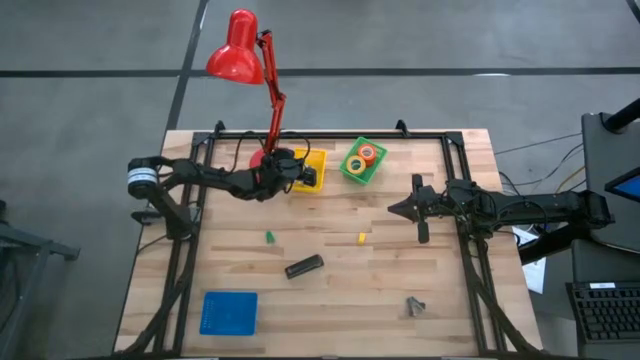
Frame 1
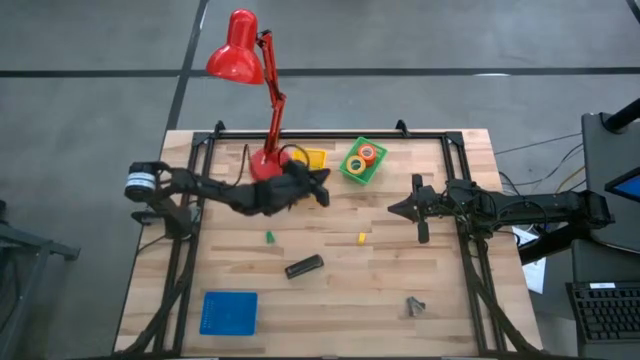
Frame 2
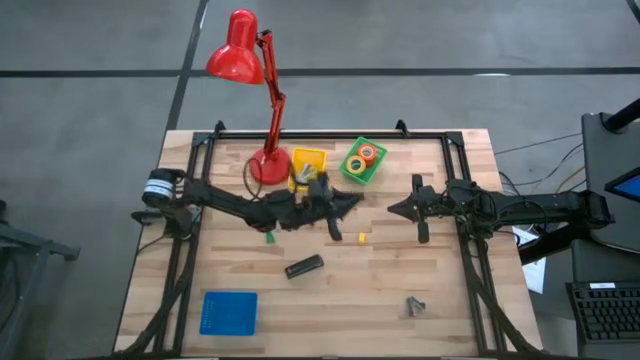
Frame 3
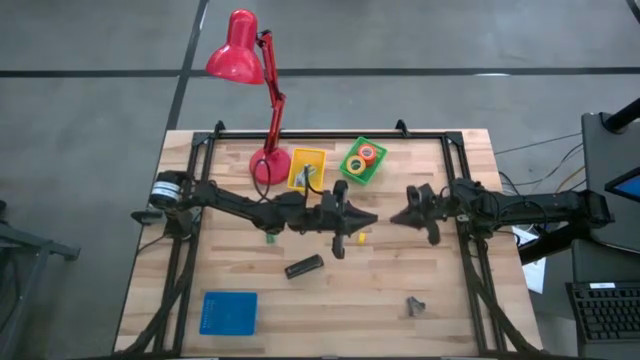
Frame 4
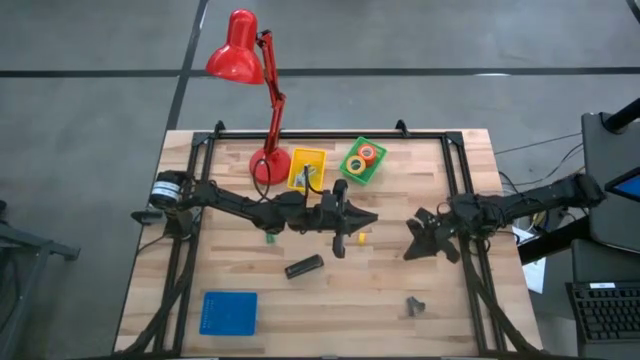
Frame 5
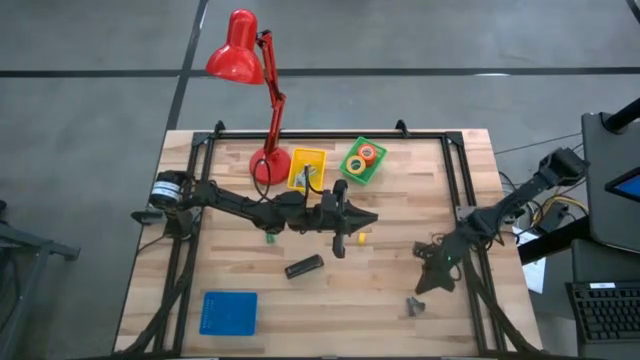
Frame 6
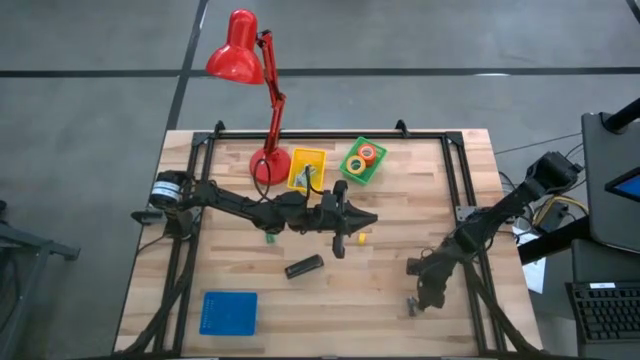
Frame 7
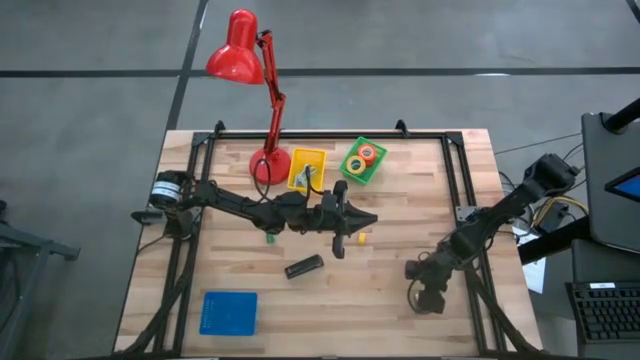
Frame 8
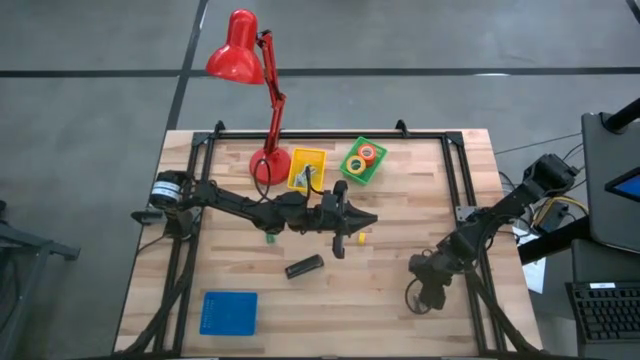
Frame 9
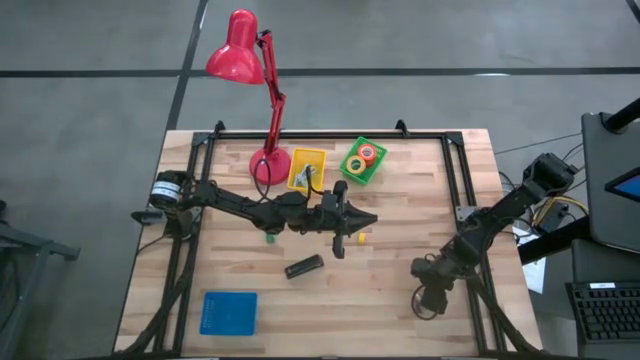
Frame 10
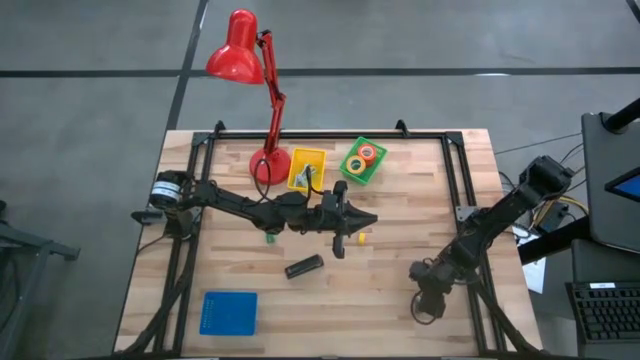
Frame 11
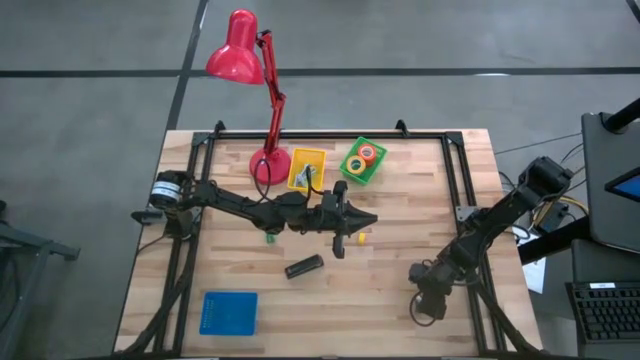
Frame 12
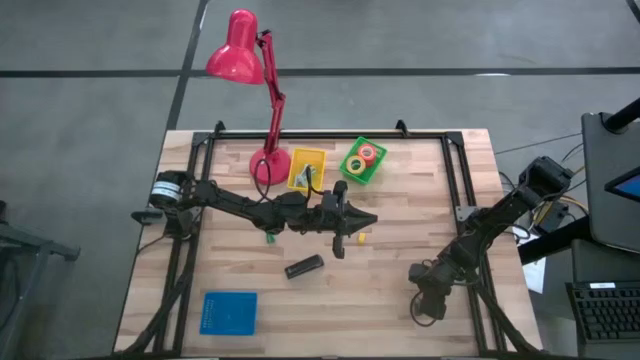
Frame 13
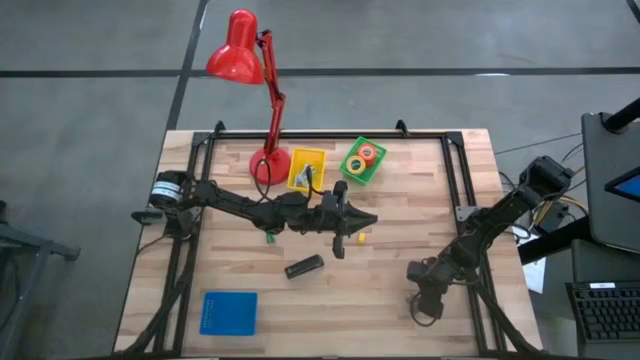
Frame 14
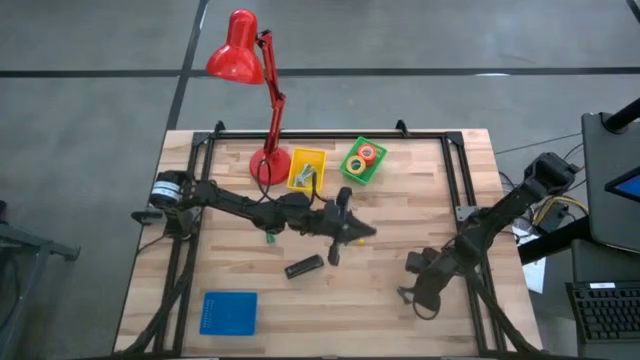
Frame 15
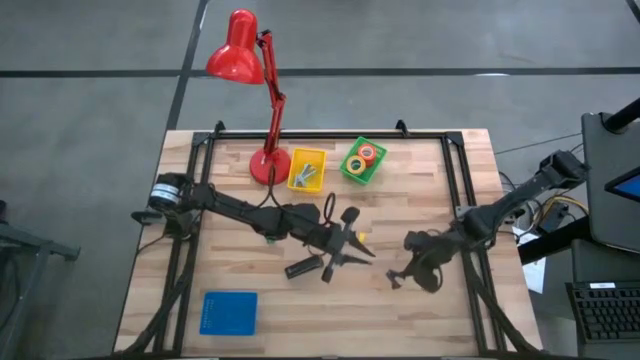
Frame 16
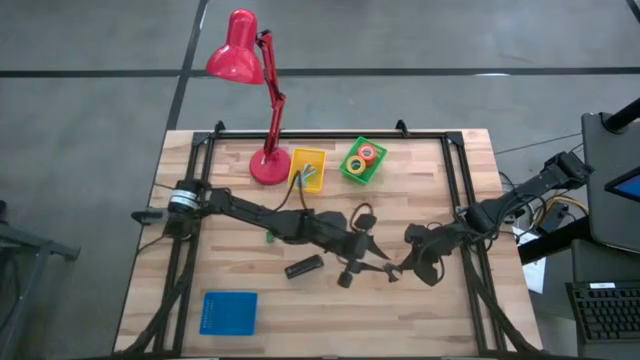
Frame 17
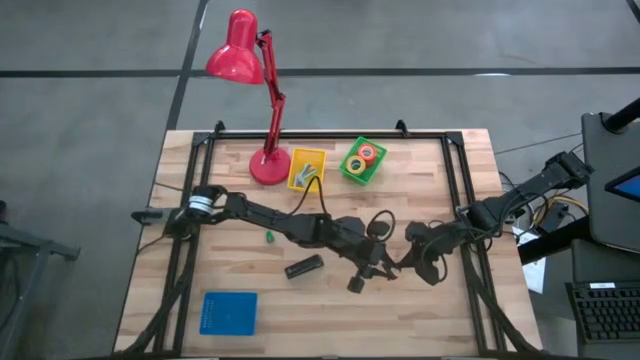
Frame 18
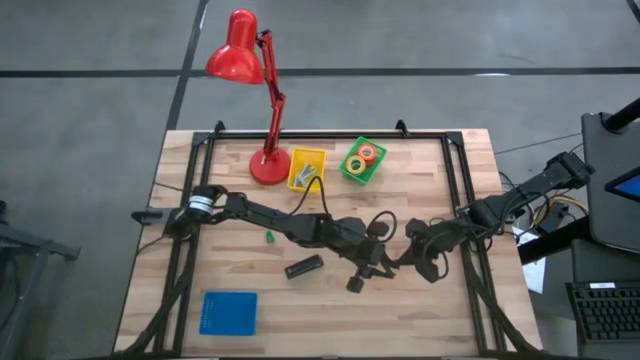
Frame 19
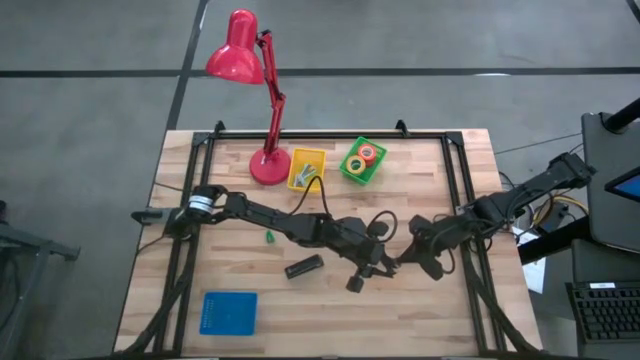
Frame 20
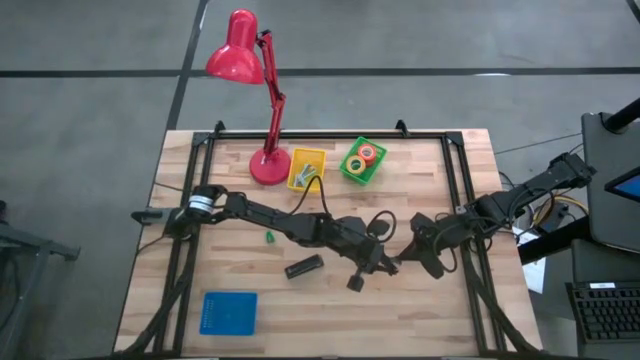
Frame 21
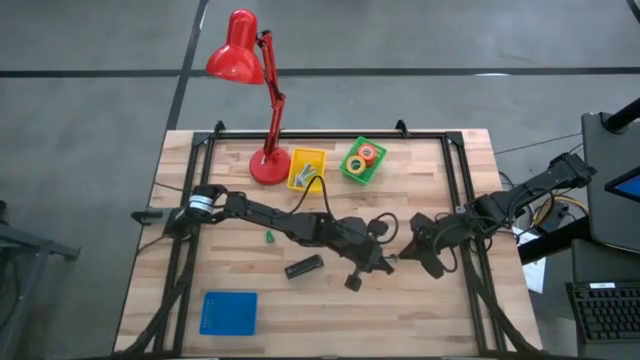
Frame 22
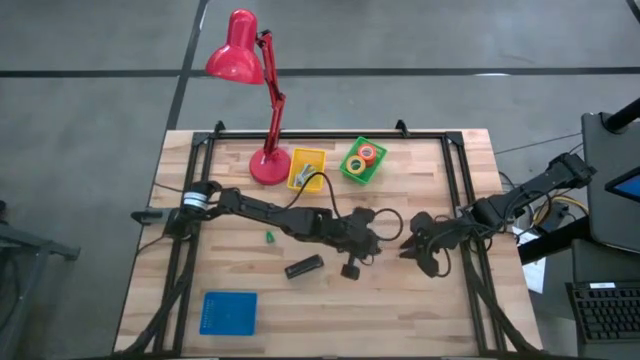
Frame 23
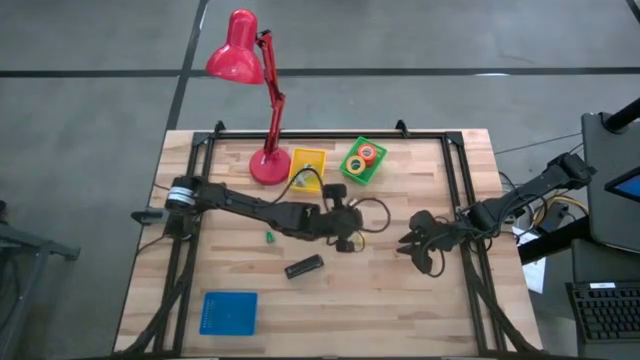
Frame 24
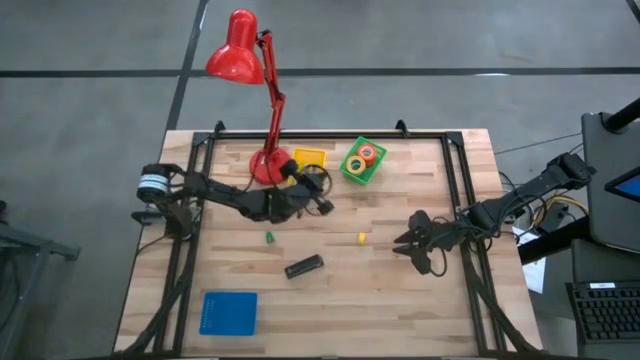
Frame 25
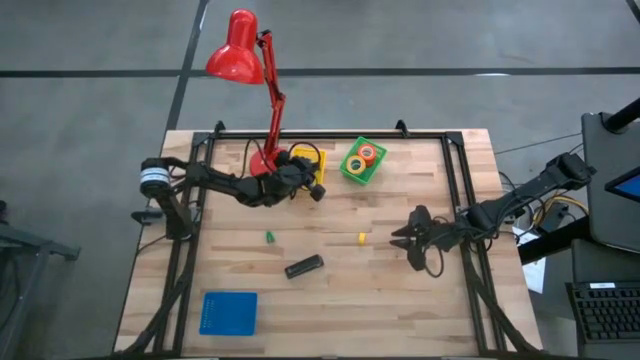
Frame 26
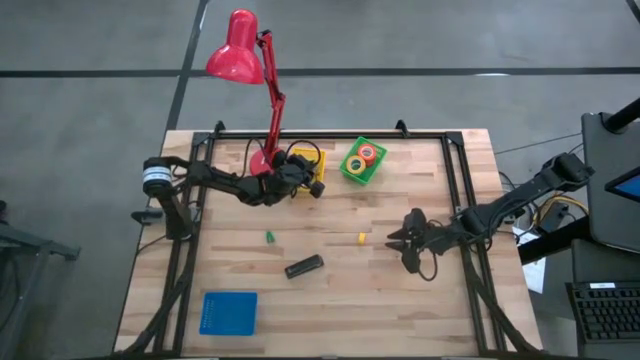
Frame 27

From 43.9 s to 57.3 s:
Task: Pick and place Stapler, Stapler remover, tape
Put the gray staple remover into the yellow bin

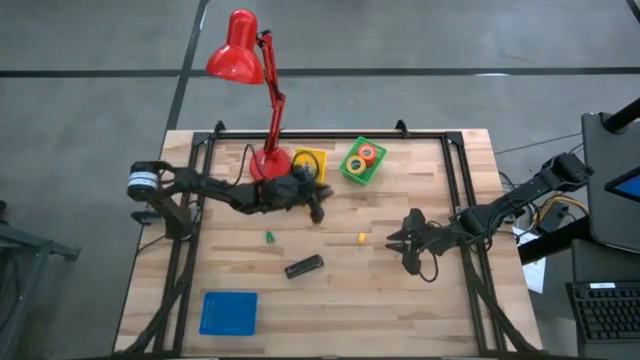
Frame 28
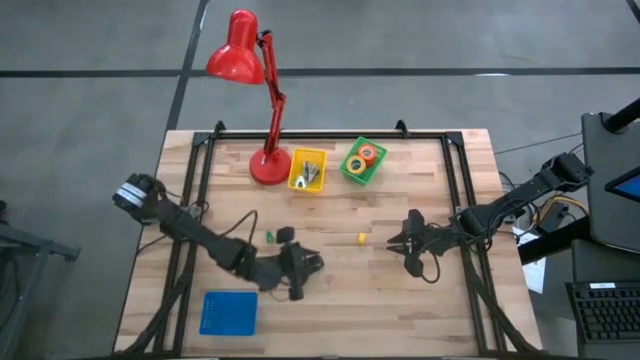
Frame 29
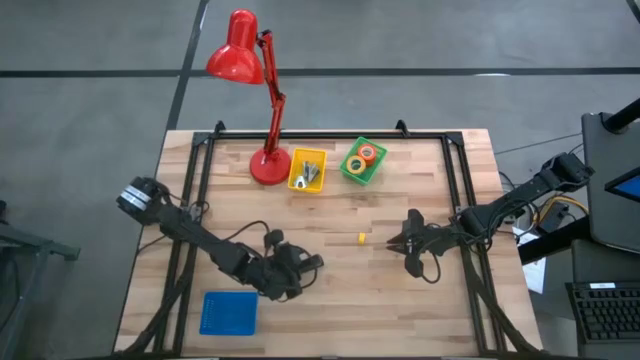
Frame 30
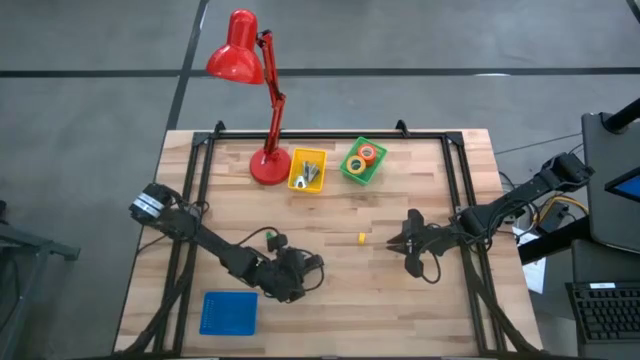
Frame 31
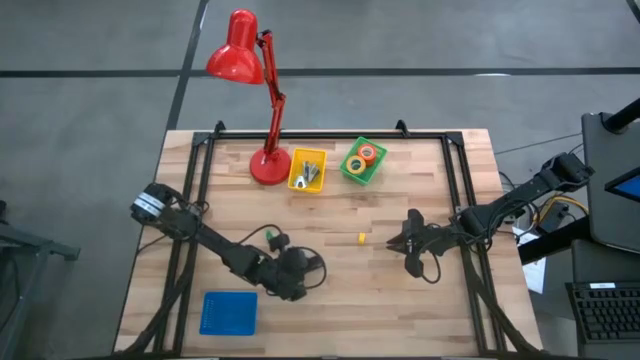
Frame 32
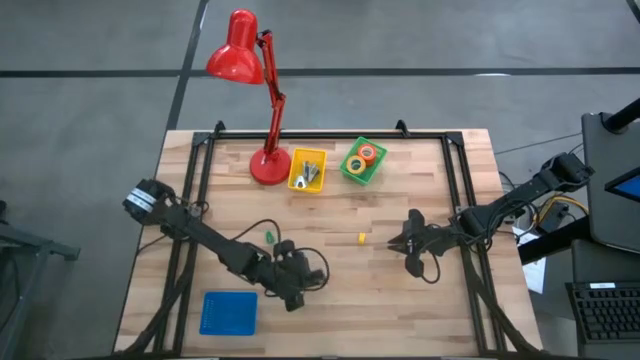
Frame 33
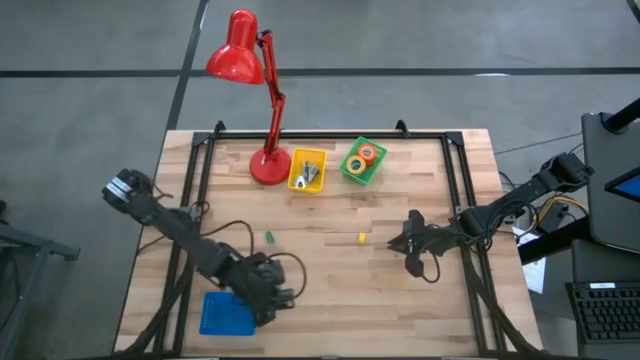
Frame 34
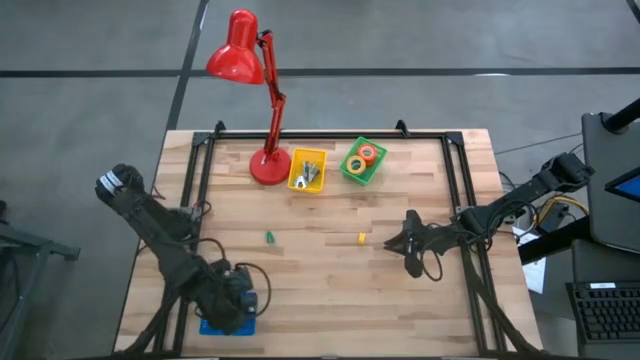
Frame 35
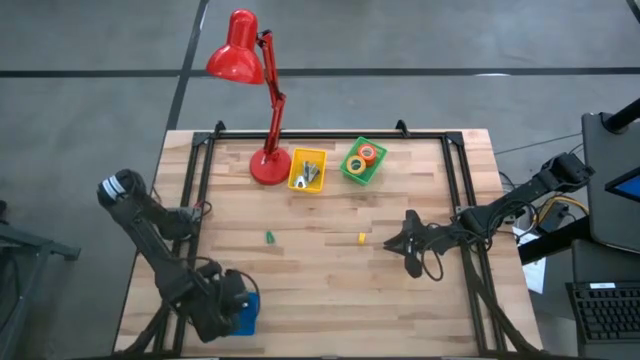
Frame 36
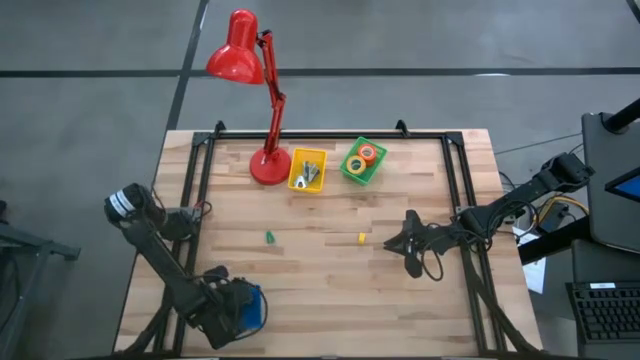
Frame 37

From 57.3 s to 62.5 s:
Put the large black stapler into the blue bin

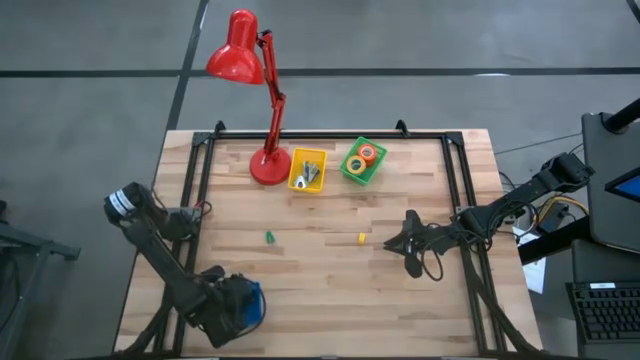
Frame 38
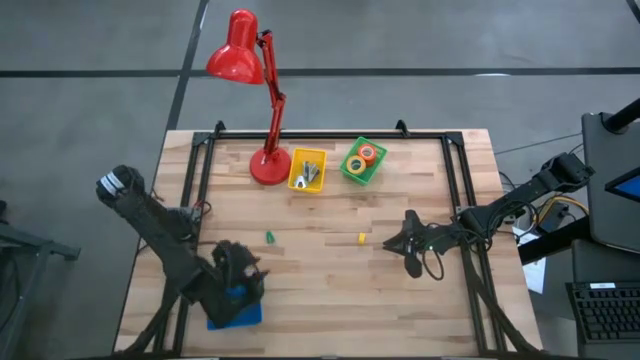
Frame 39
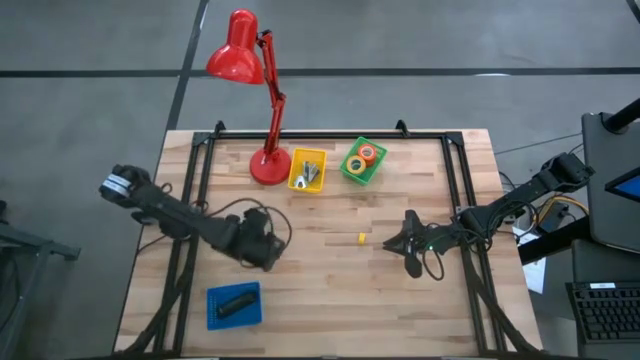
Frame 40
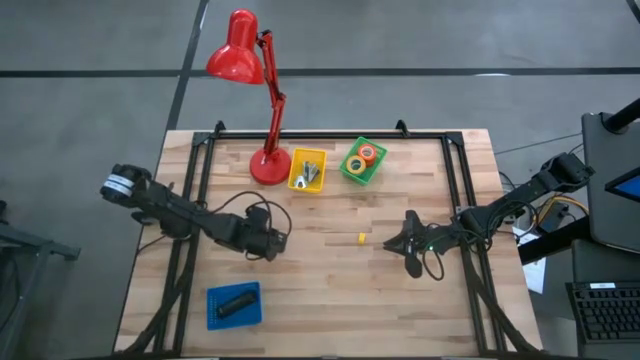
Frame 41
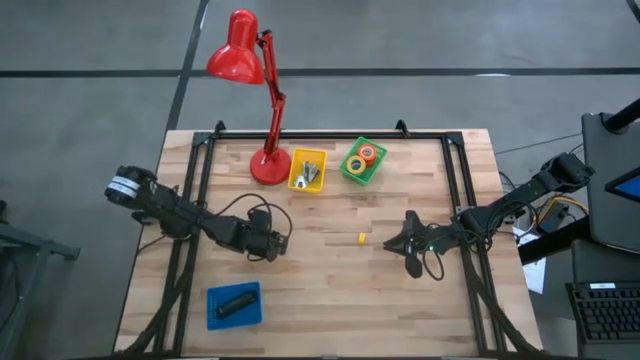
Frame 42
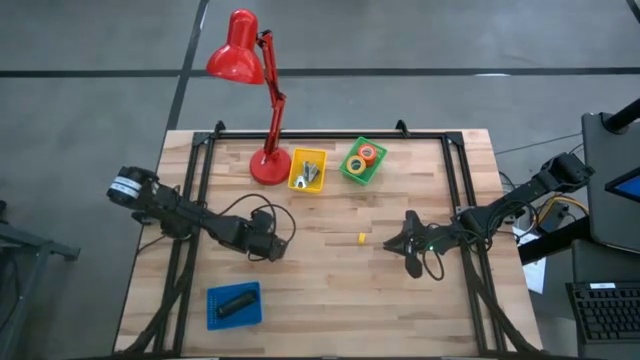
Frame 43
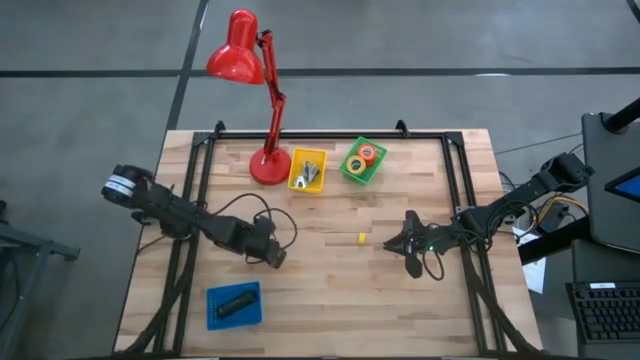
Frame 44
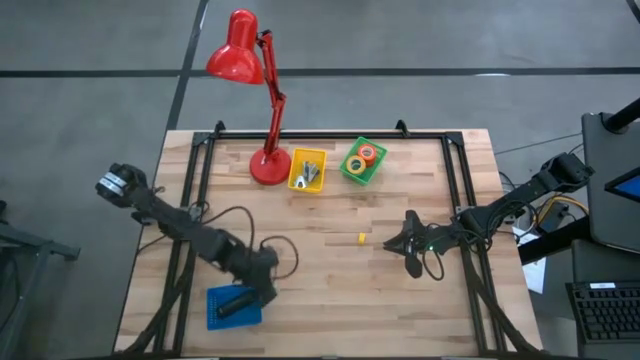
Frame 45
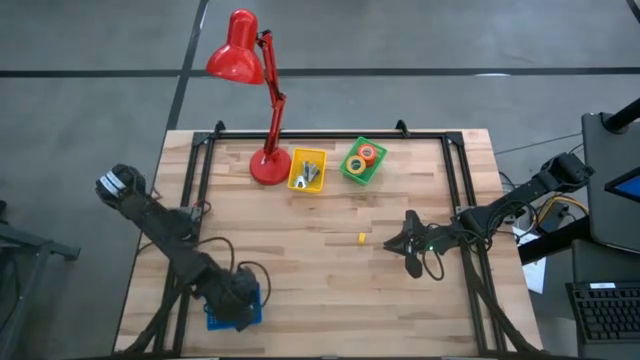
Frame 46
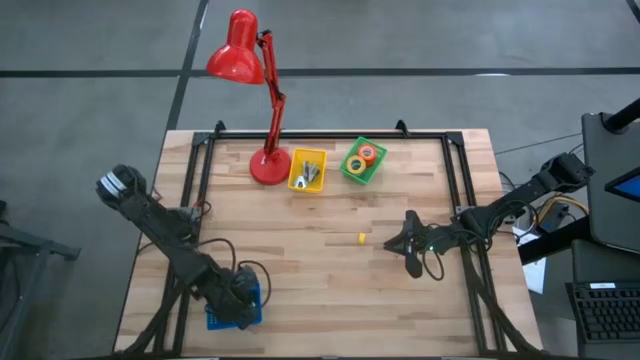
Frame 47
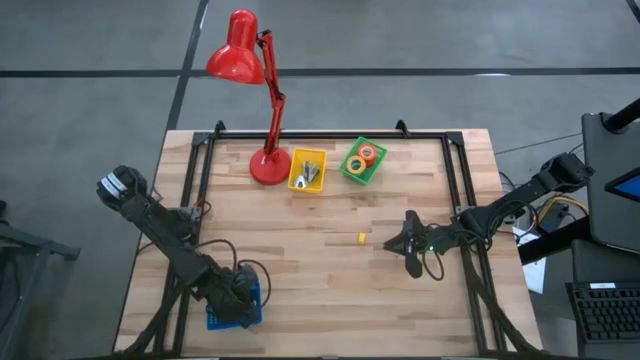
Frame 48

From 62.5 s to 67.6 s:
Put the small green stapler into the blue bin
